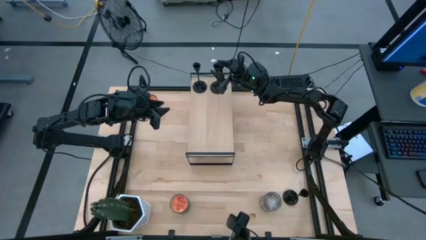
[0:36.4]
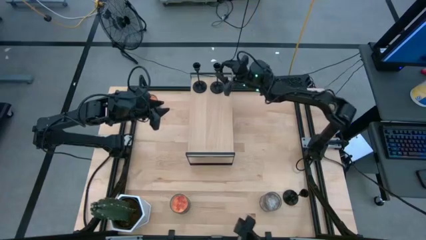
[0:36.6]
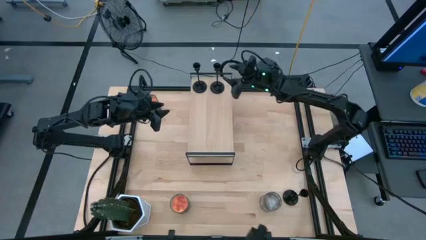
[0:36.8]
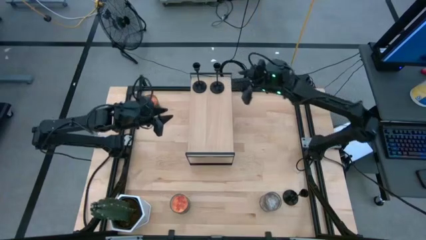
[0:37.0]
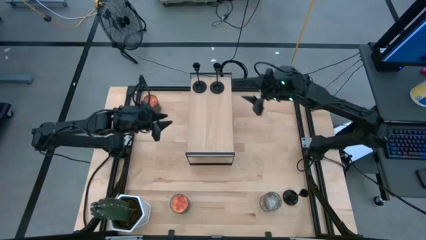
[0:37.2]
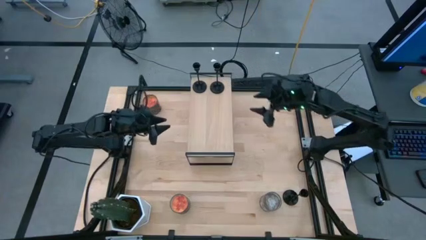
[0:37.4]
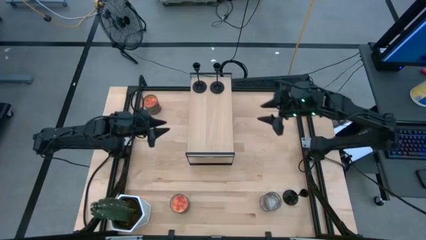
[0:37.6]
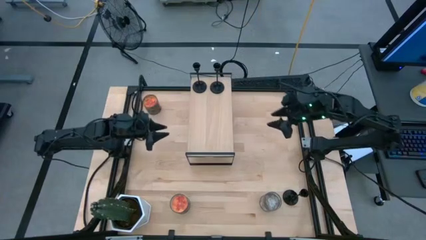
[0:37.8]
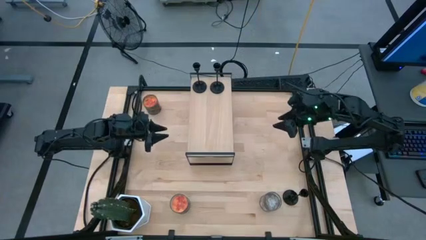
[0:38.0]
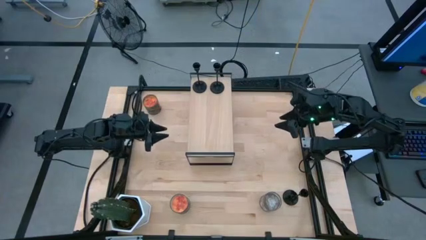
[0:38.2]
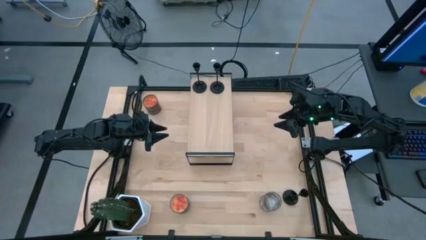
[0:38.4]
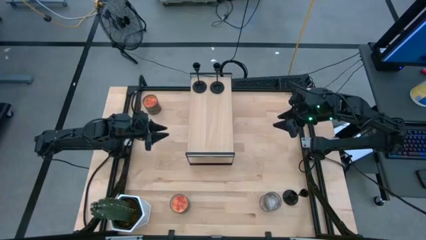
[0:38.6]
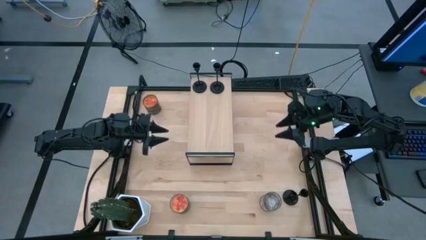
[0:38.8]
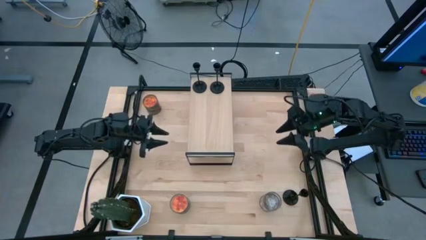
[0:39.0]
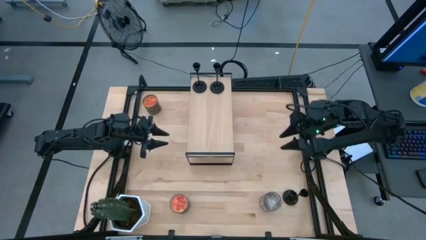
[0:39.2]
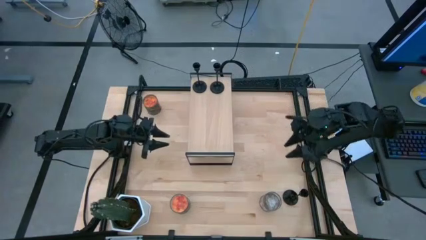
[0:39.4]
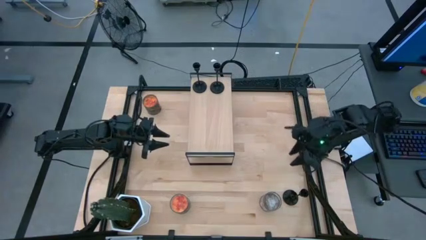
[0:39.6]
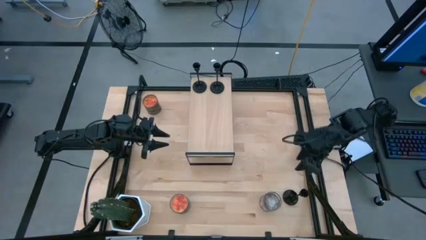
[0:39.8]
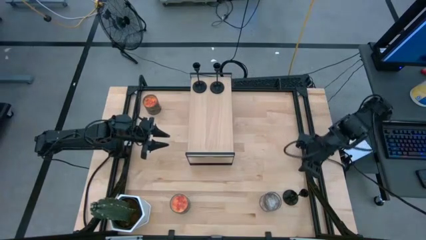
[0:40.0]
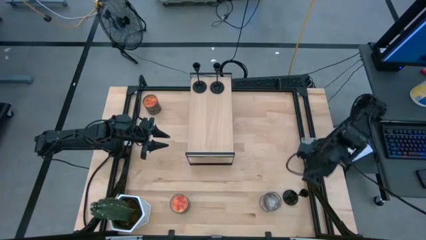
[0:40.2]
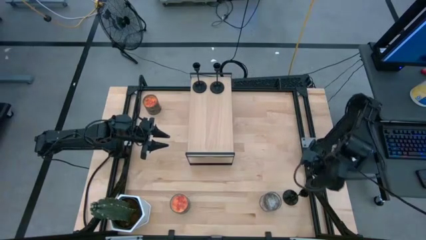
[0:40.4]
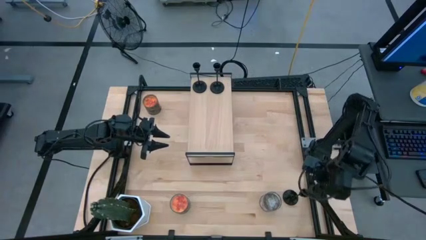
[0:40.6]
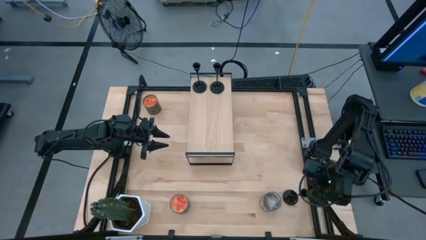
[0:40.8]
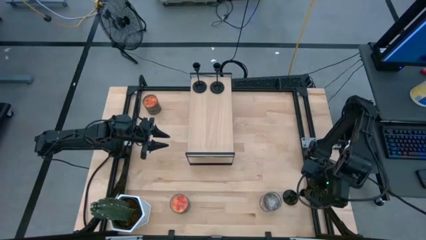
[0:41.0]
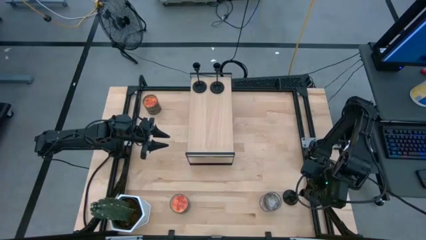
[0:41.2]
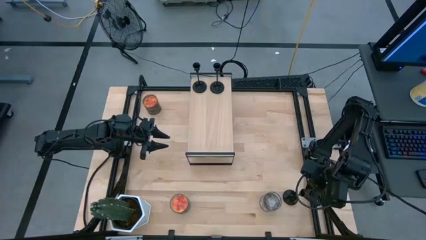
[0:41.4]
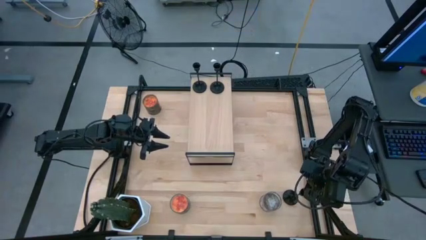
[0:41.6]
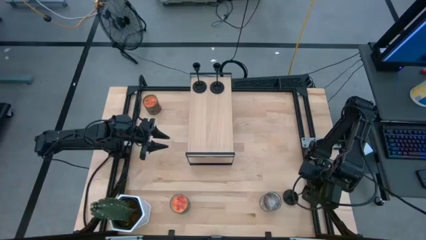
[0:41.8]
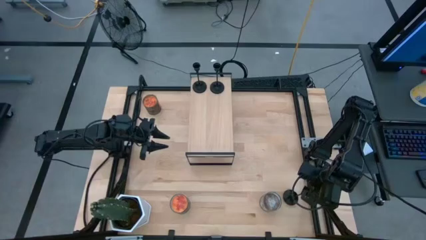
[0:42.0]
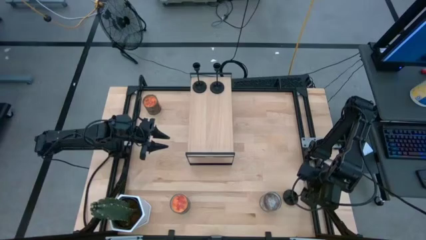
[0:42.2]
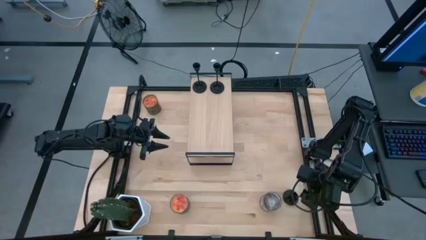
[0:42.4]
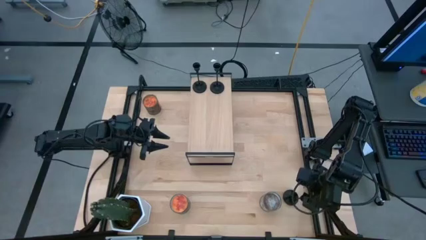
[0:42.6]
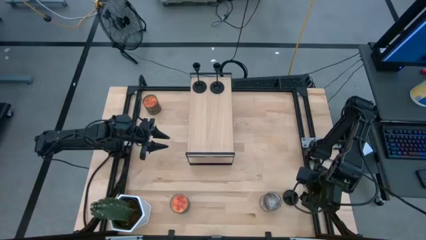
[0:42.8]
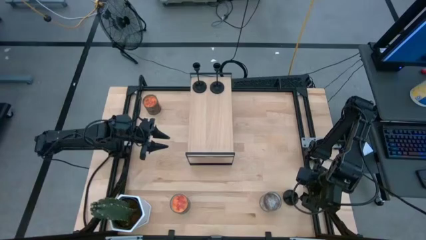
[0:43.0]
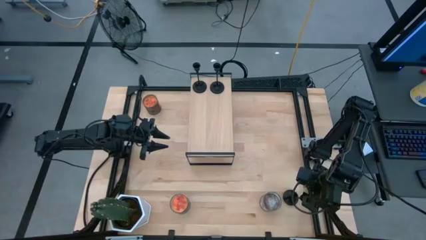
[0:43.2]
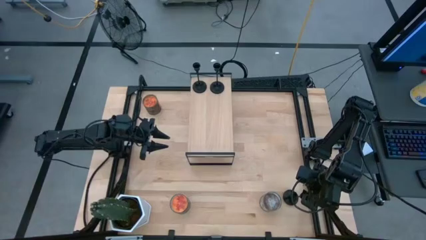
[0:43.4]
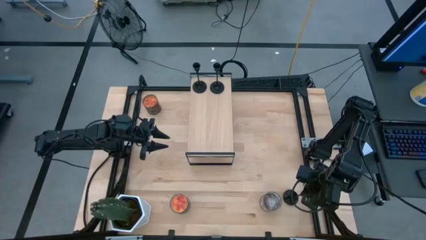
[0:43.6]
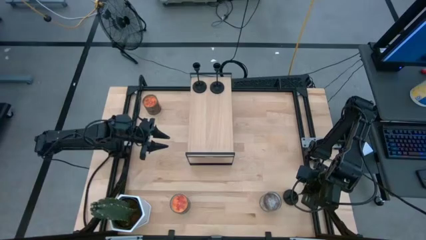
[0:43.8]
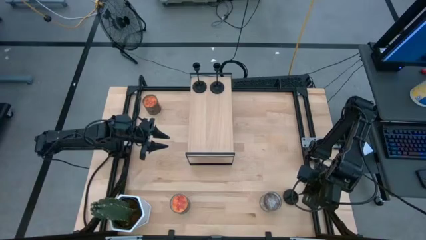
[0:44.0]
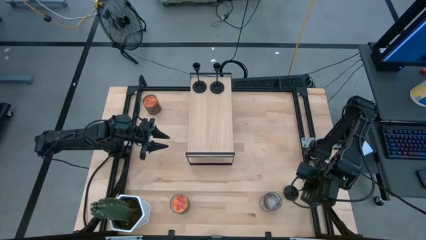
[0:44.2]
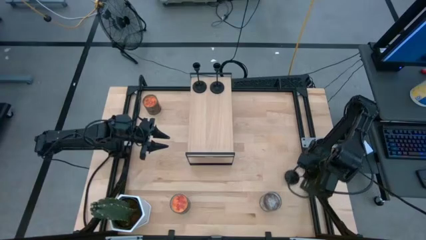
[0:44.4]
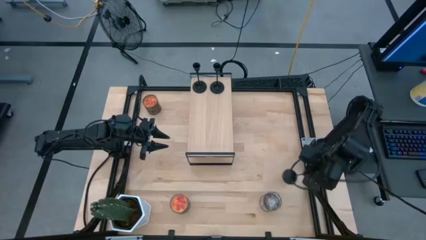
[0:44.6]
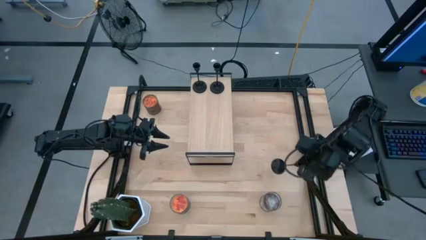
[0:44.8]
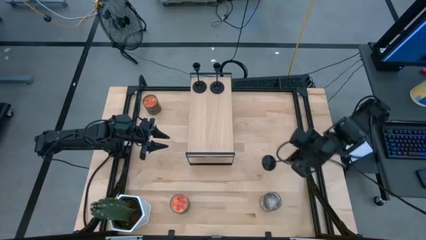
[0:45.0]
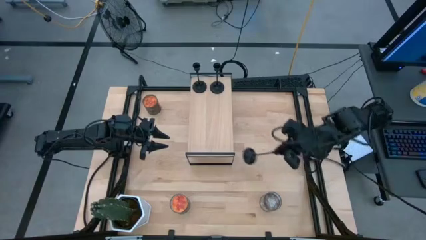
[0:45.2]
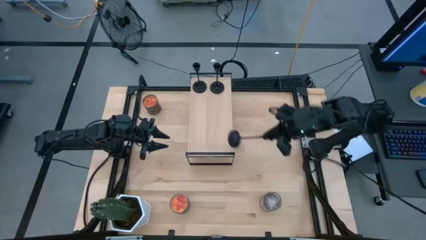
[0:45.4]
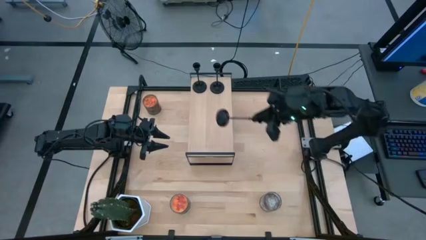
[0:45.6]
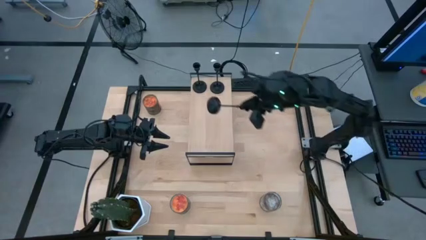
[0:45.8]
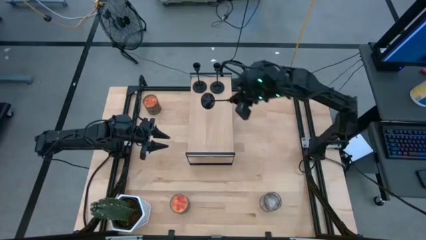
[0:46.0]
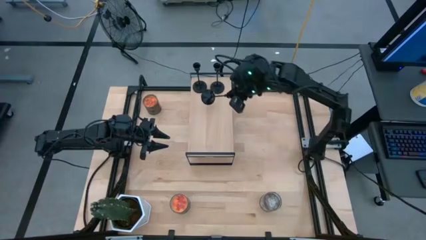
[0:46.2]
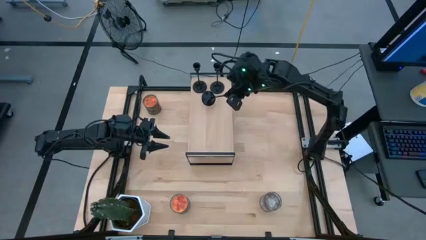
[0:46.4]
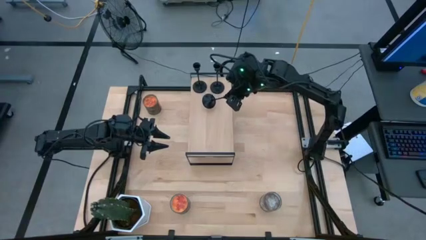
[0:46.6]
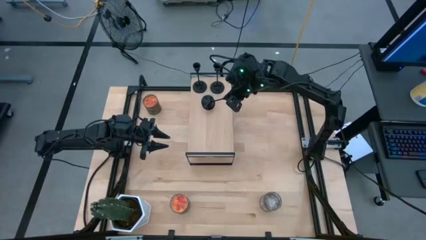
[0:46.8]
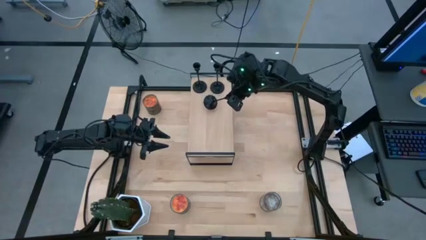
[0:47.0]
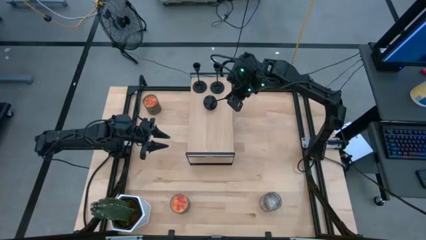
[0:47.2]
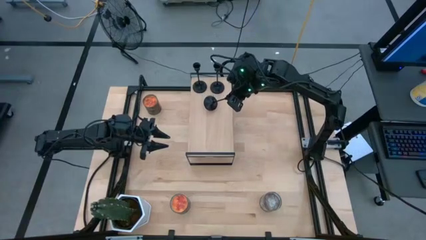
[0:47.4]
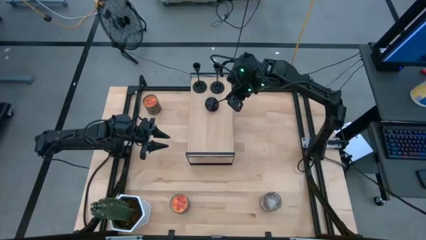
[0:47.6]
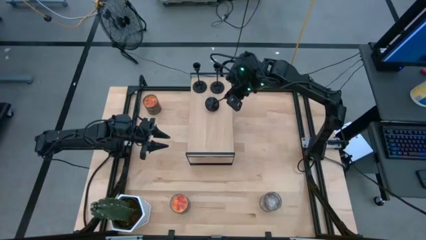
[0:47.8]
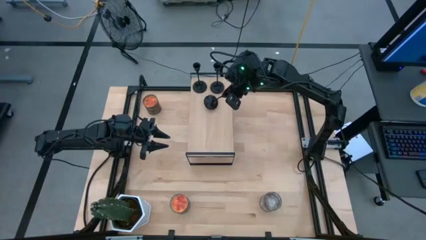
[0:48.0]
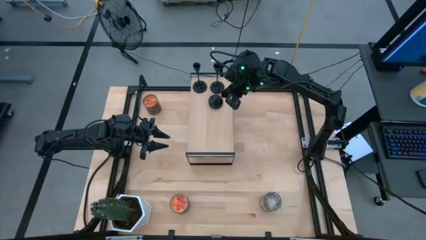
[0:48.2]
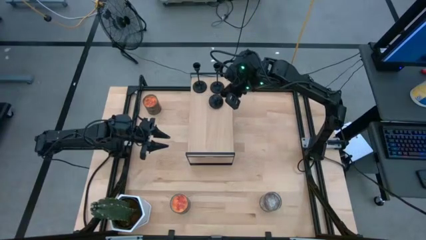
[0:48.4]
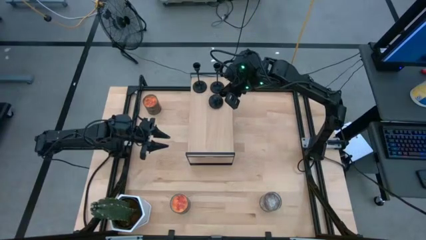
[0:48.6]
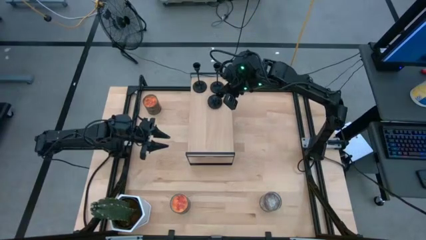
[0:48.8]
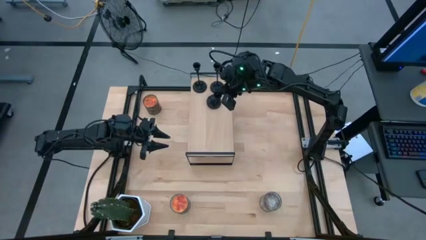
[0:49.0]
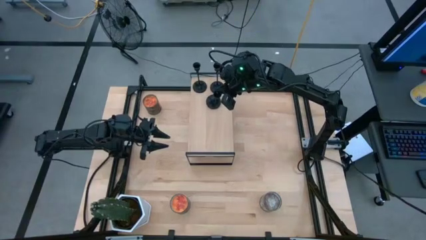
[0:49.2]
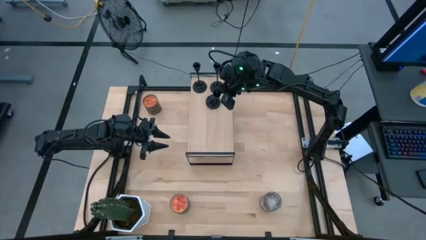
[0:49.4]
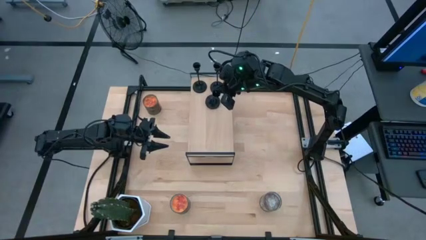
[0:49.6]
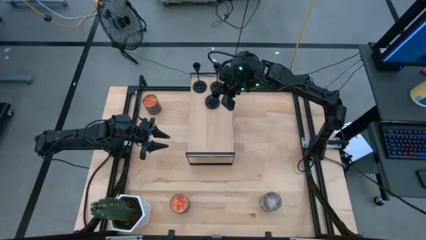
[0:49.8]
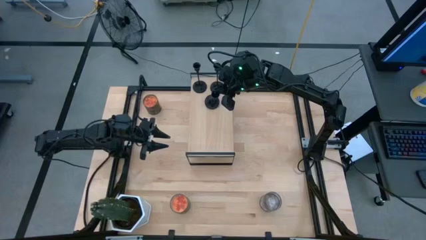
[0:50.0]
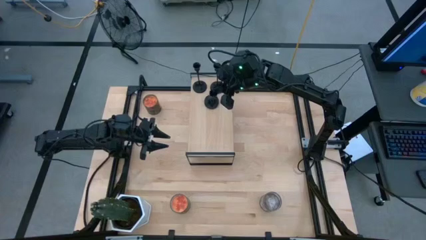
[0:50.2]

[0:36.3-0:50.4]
Task: Pick & Place candle stick holders
Put the black candle holder on the shelf

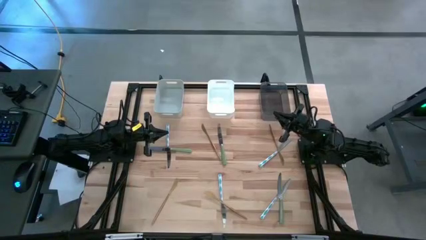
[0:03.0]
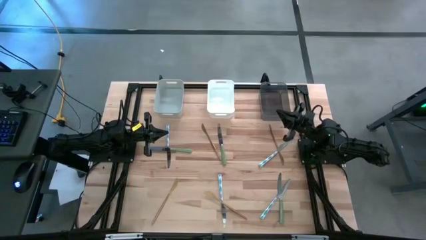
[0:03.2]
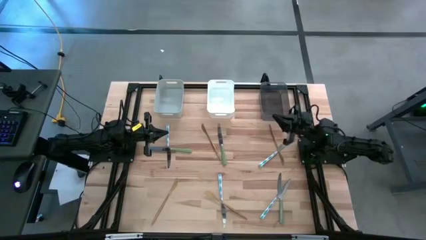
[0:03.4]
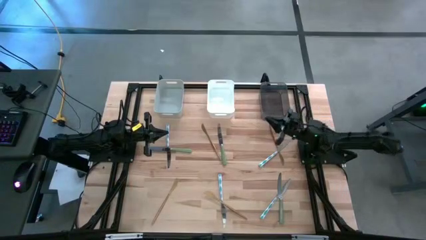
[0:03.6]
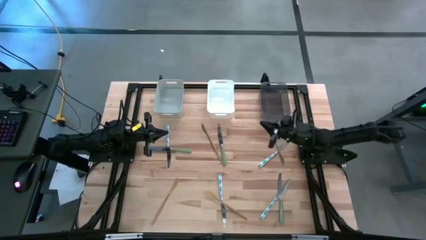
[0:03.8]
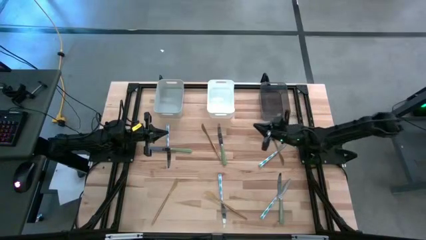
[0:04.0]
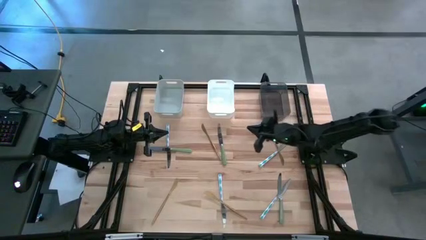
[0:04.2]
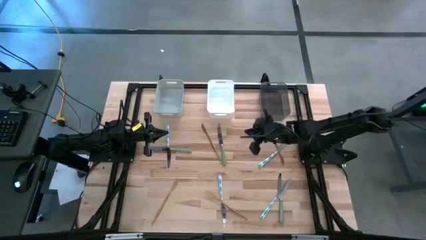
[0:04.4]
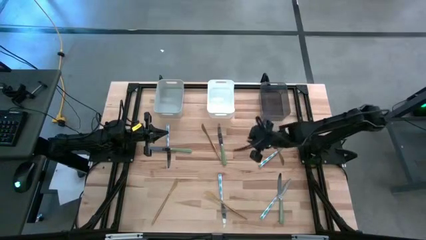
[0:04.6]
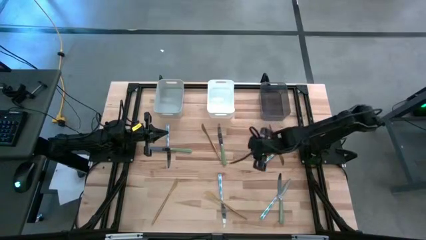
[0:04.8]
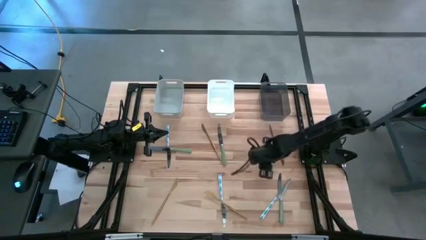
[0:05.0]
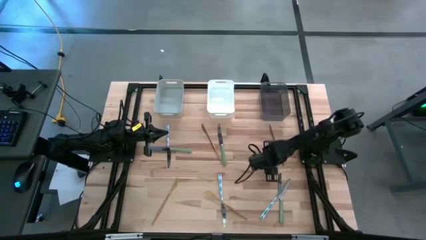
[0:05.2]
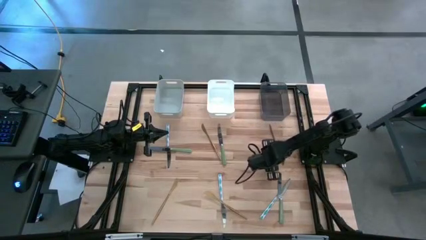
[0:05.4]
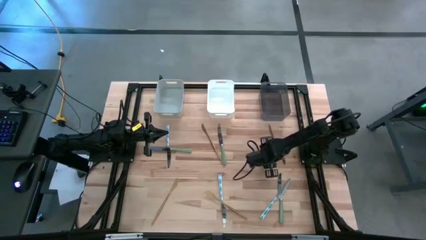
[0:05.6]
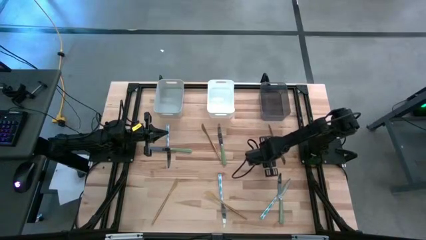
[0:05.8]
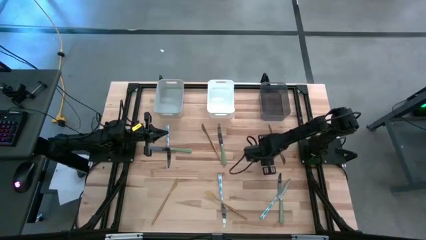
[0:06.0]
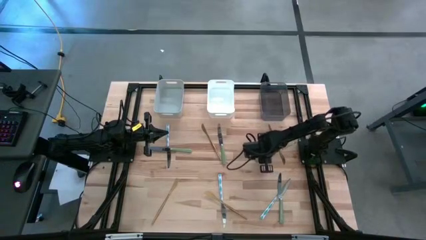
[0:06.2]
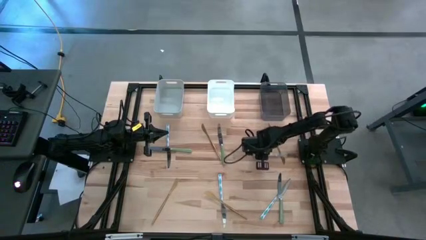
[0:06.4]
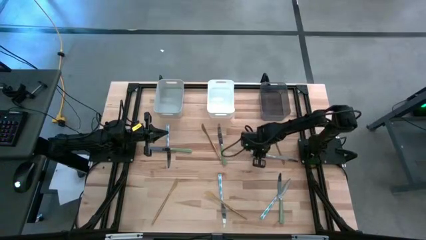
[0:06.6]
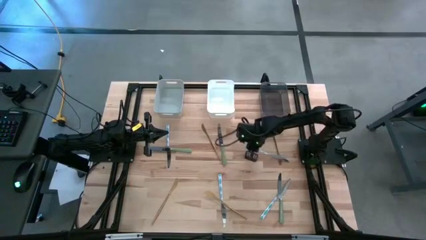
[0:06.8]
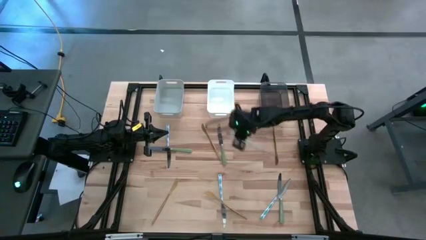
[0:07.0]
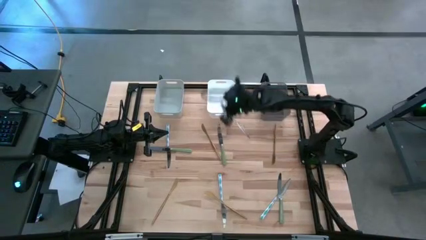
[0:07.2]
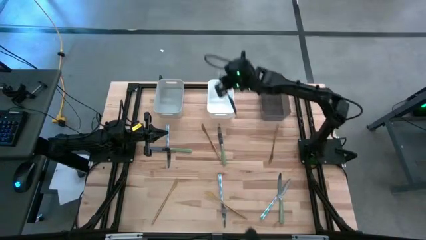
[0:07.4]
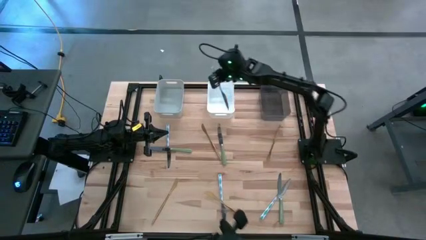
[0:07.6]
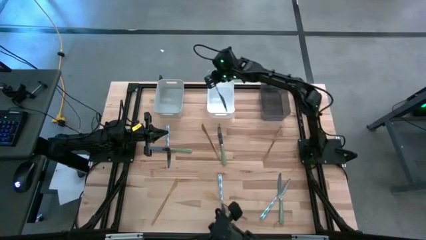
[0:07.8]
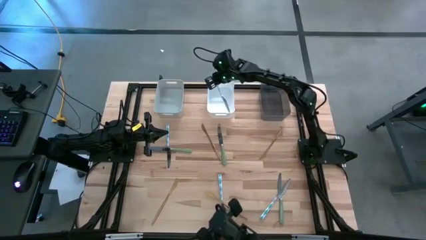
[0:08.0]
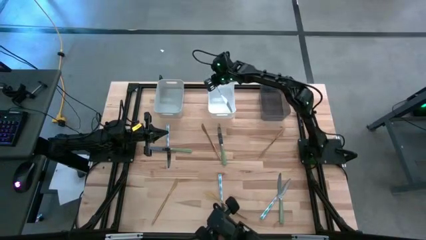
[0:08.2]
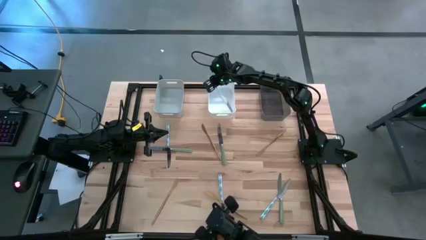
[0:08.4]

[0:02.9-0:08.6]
Task: Sort silverware by color (type)
Put the top right blue table knife into the white bin
